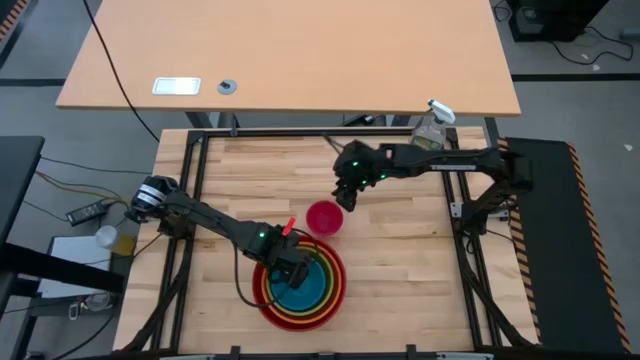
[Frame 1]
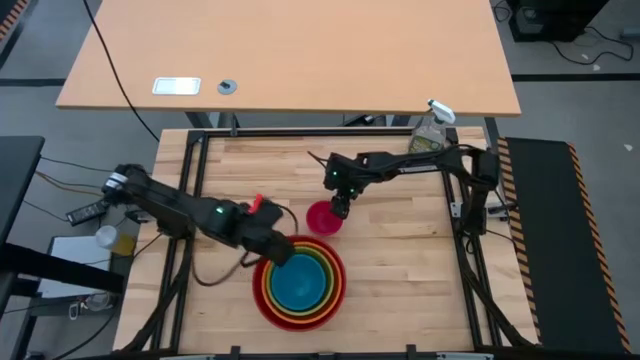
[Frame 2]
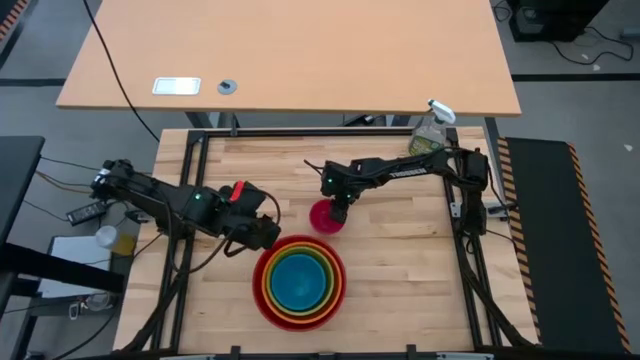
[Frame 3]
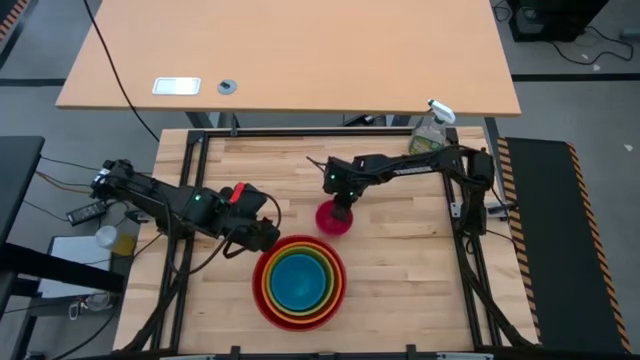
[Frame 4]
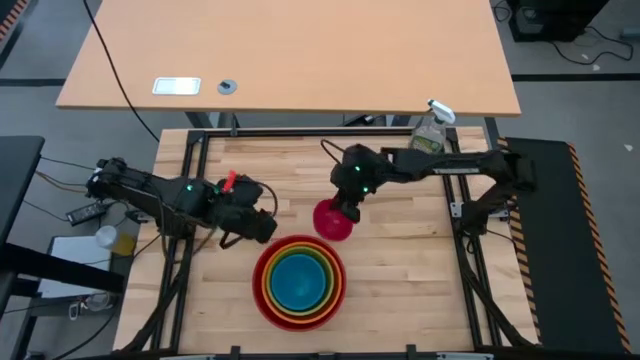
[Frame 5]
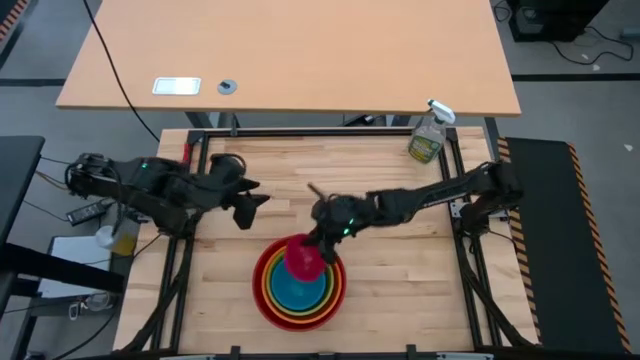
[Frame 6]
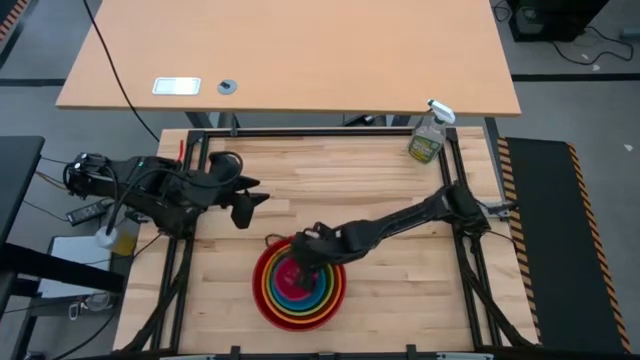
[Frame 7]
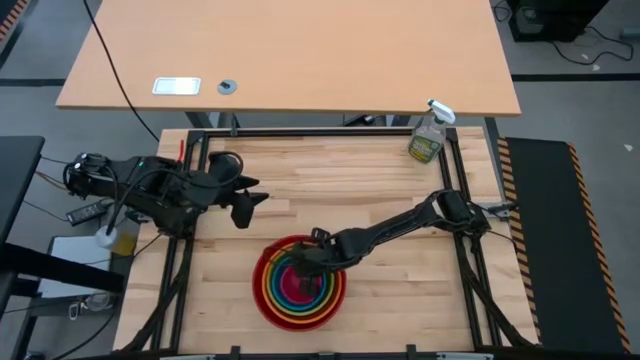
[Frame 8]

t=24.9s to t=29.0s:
Stack the light pink bowl on the blue bowl

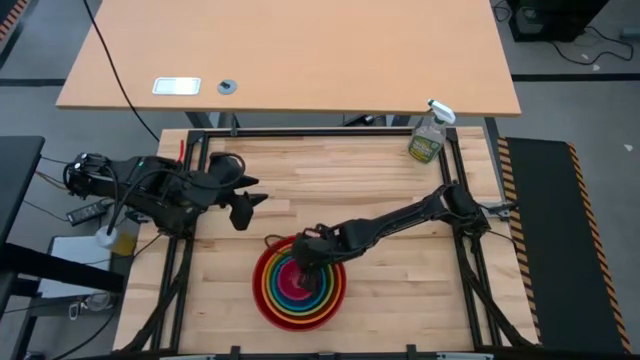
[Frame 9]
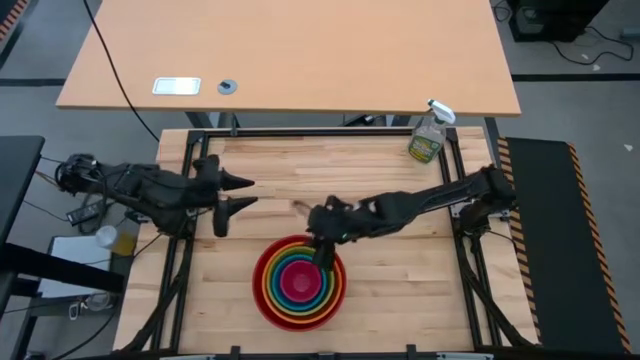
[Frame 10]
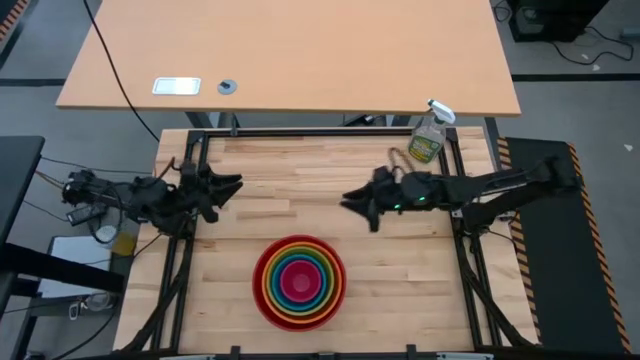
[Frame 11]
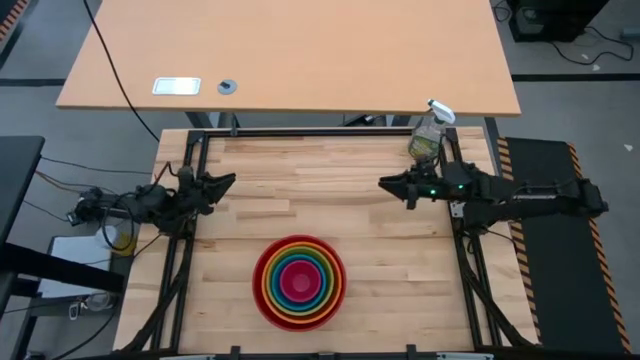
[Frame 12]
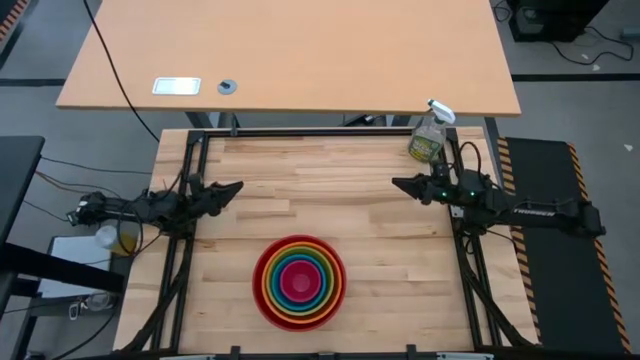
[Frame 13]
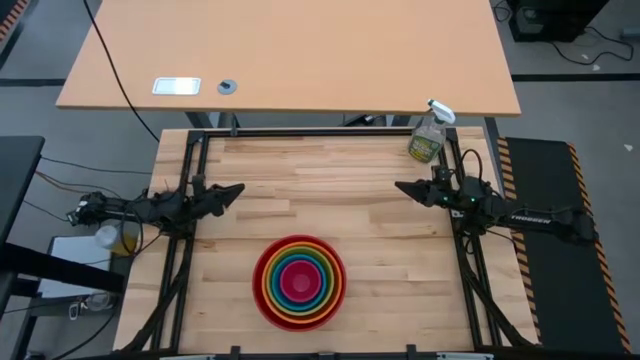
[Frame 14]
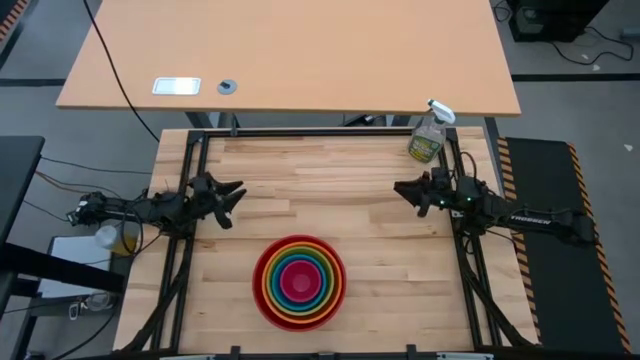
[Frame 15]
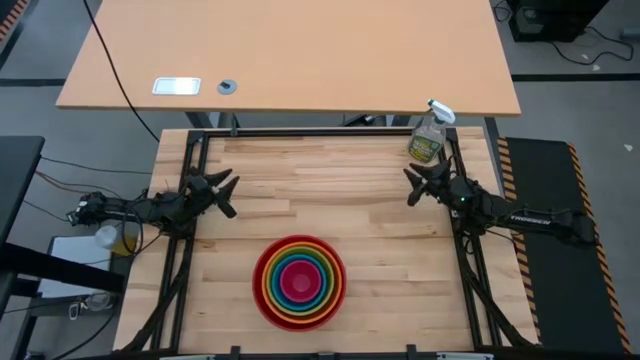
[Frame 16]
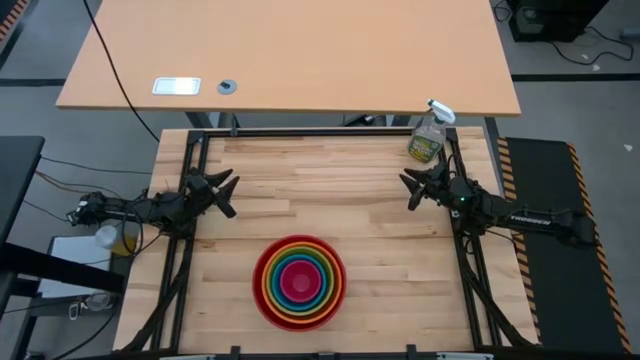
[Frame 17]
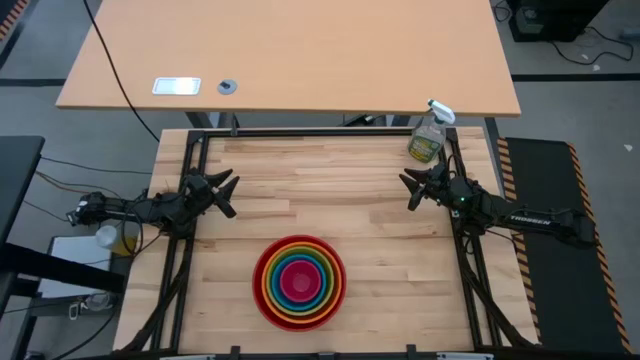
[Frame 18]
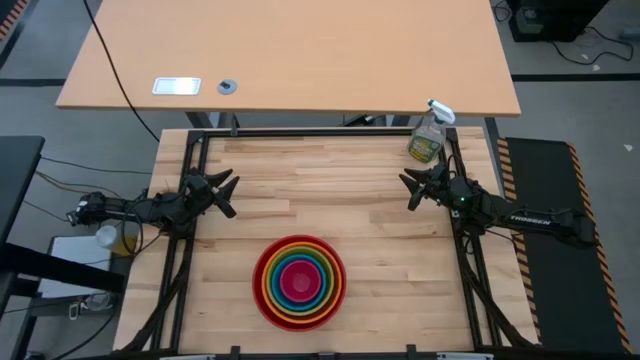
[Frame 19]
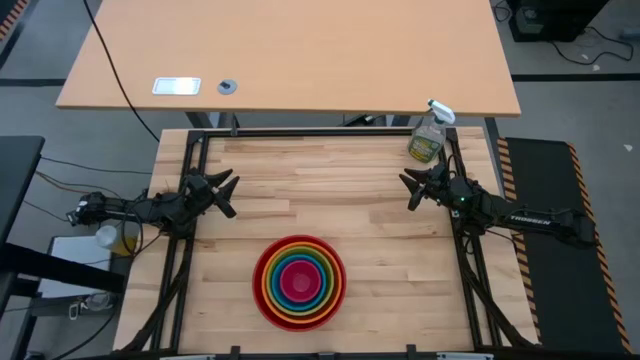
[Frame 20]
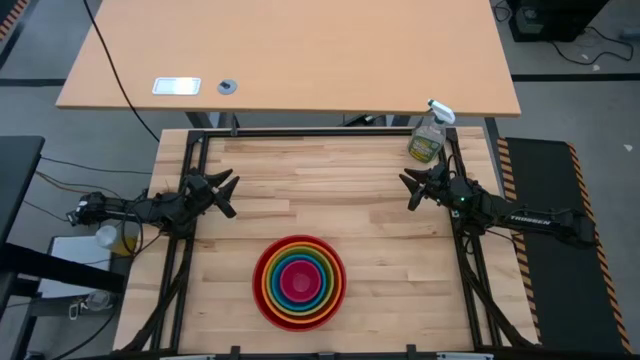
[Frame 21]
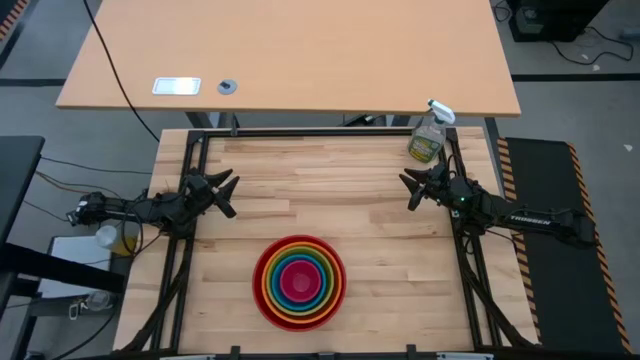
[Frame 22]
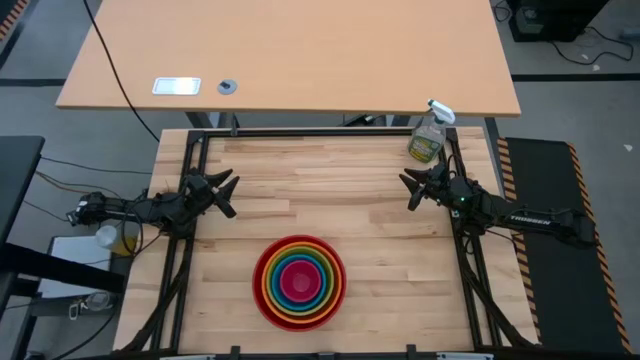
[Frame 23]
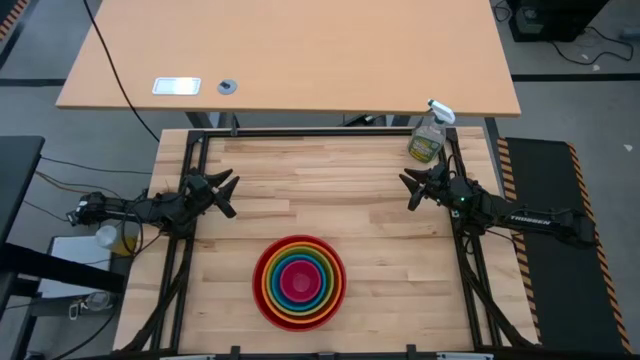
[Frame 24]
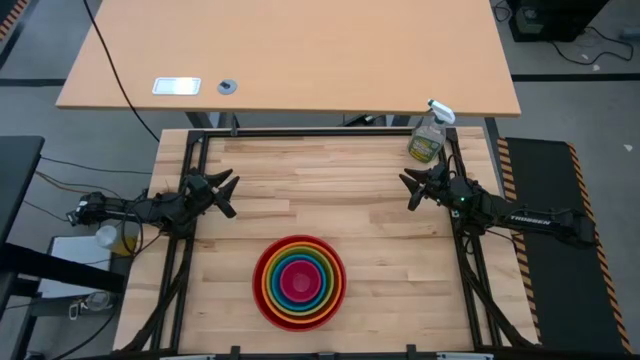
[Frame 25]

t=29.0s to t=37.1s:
Return to Home Position

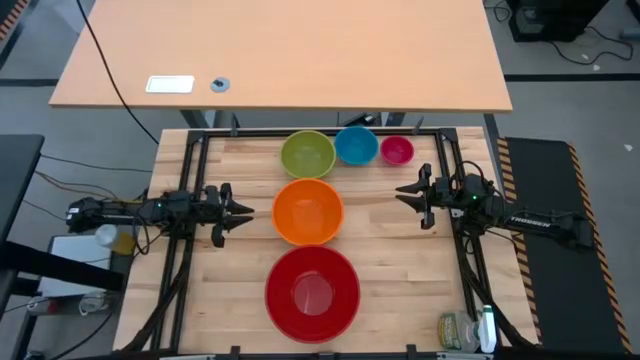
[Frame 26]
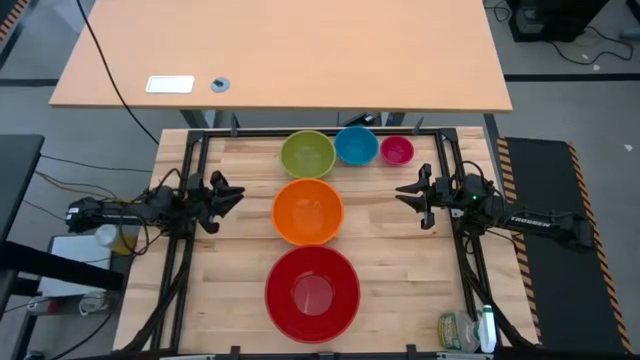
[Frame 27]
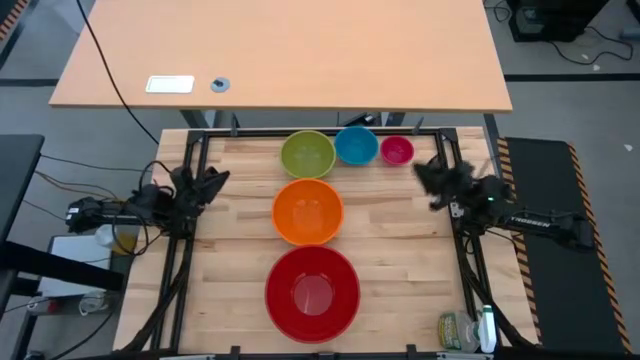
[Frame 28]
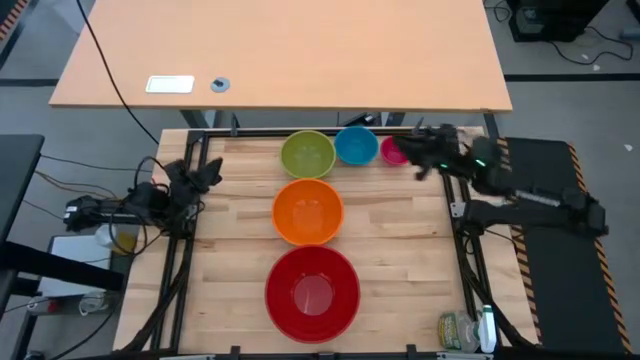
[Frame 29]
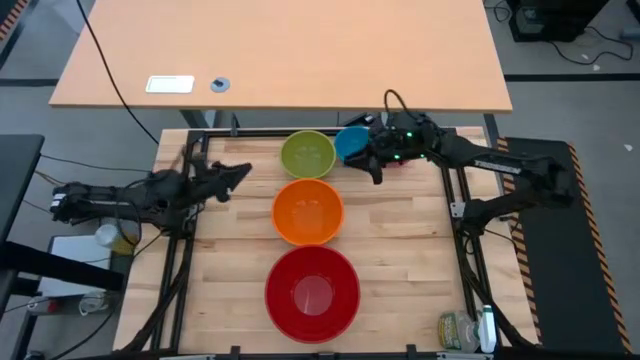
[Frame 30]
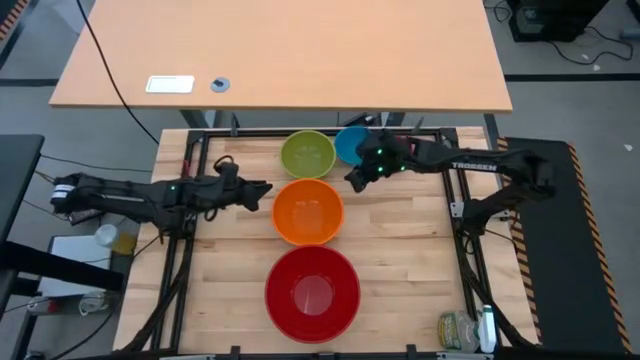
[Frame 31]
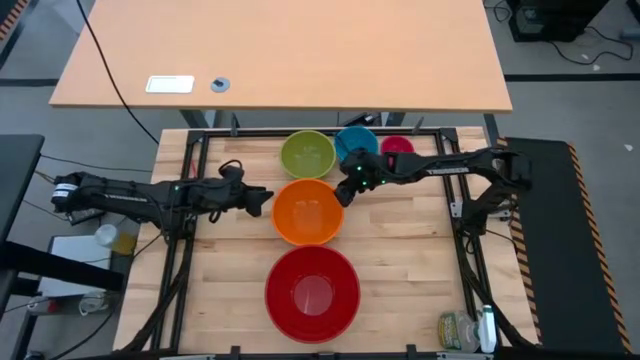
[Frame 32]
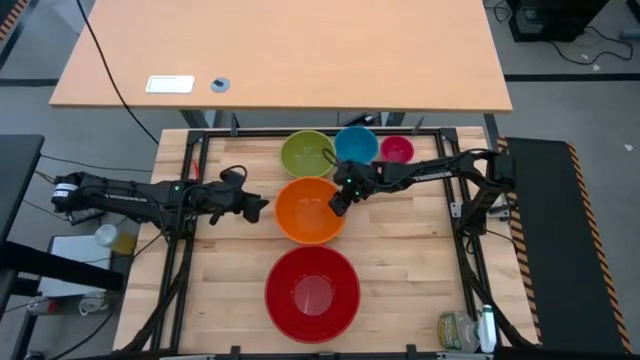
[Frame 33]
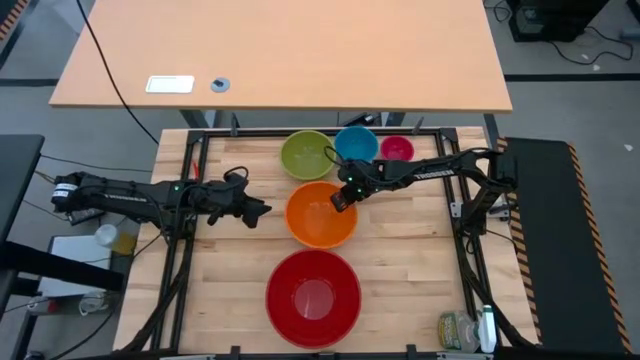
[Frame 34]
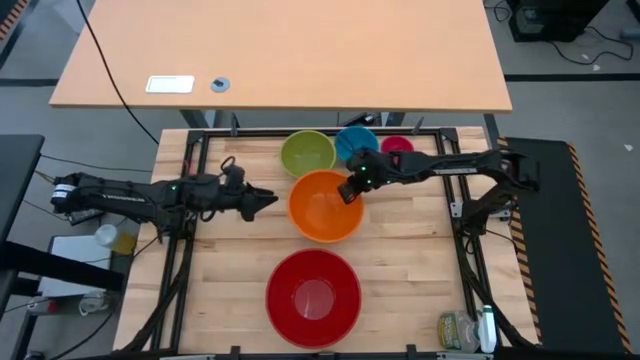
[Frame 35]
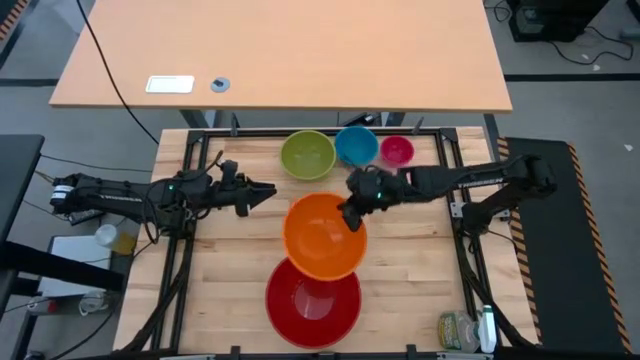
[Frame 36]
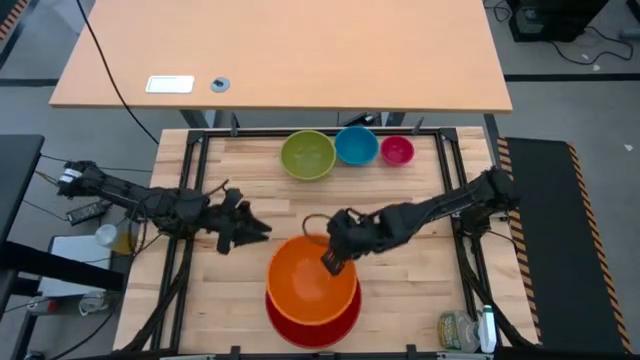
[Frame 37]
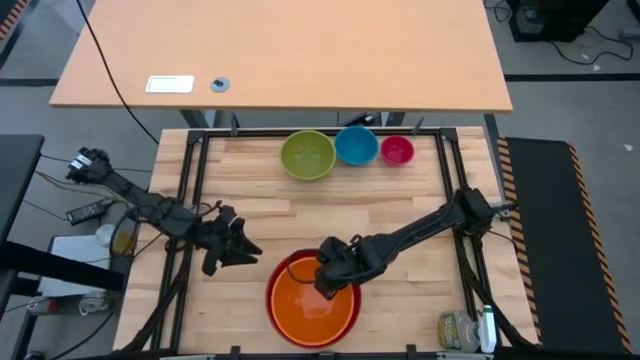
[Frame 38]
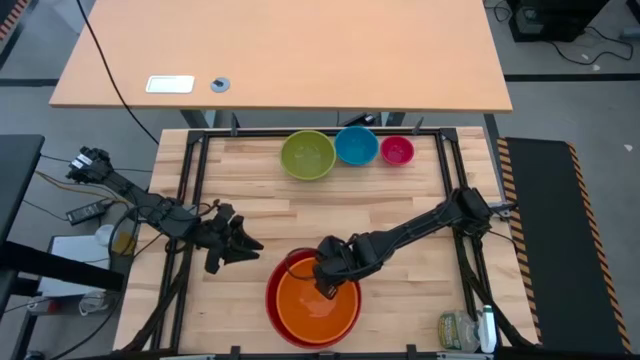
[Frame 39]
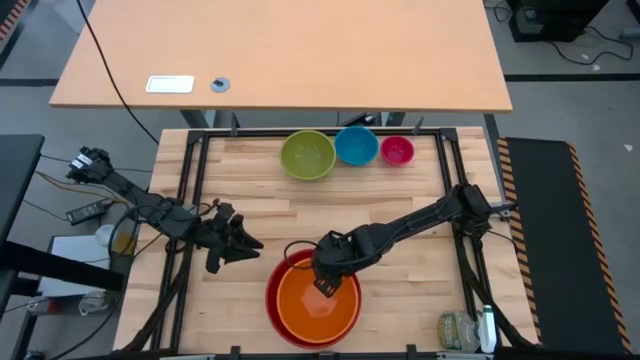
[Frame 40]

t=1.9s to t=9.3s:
Stack the orange bowl on top of the red bowl
